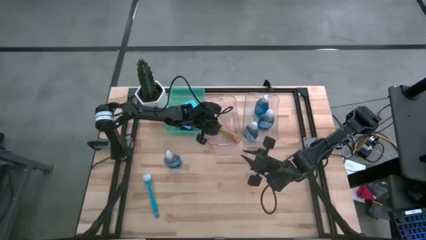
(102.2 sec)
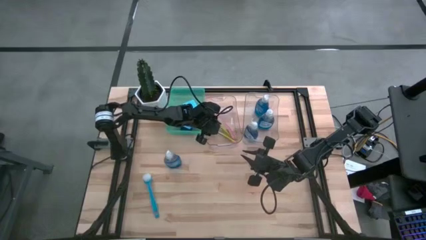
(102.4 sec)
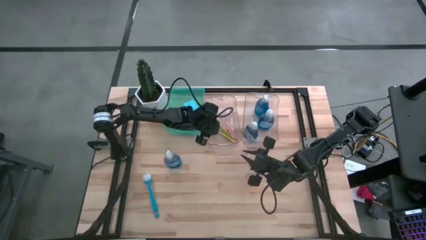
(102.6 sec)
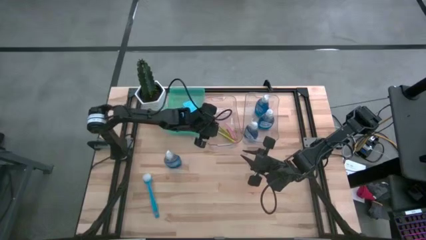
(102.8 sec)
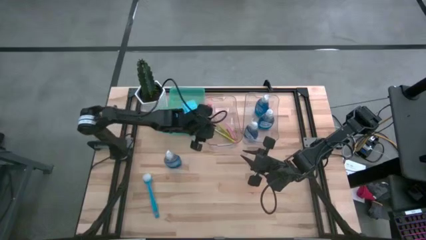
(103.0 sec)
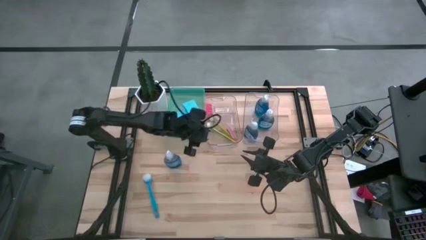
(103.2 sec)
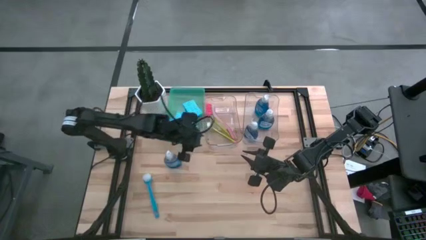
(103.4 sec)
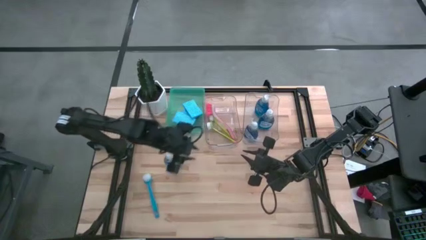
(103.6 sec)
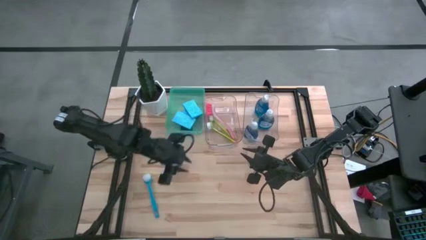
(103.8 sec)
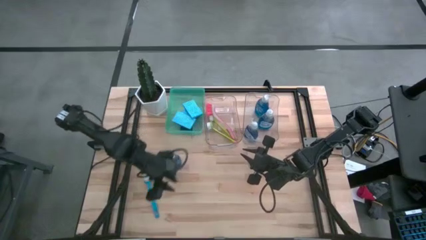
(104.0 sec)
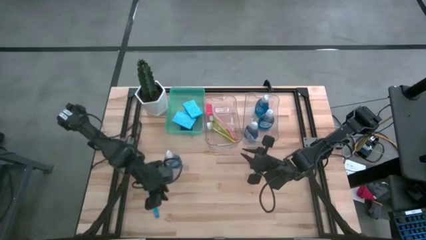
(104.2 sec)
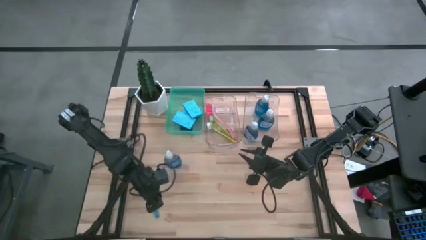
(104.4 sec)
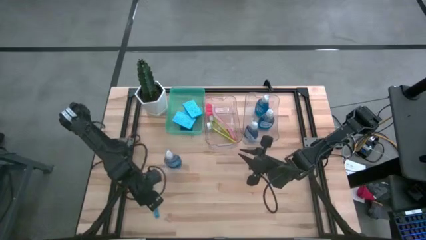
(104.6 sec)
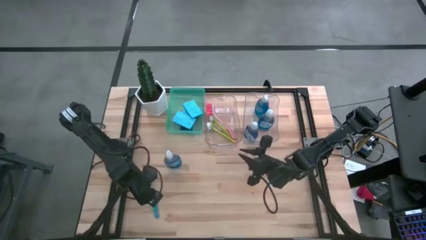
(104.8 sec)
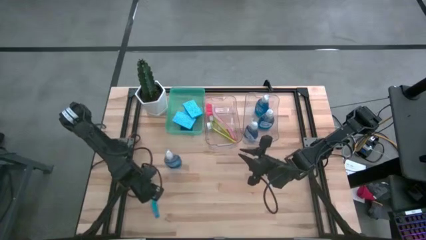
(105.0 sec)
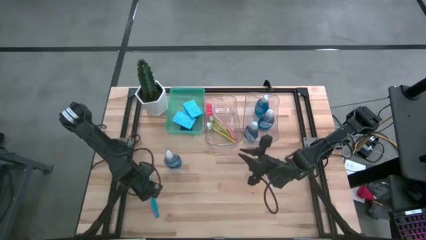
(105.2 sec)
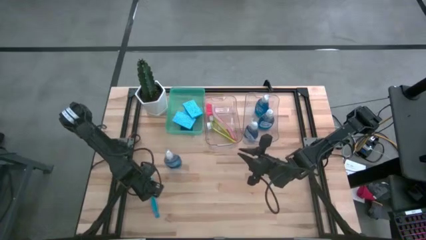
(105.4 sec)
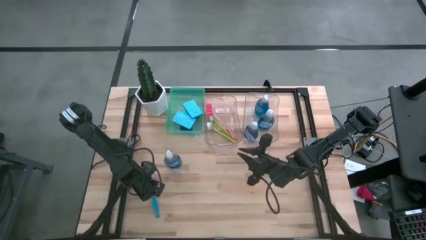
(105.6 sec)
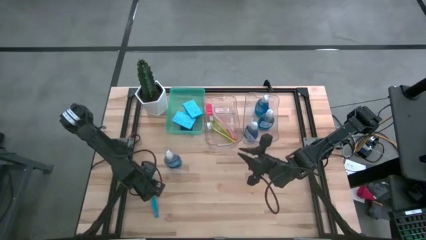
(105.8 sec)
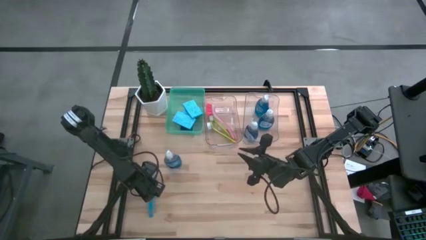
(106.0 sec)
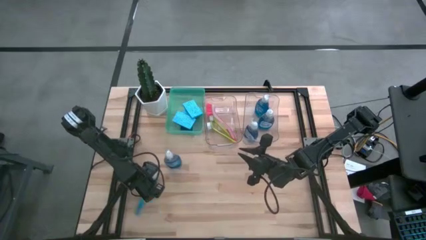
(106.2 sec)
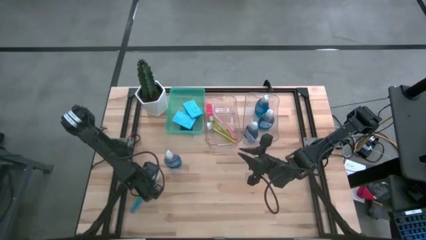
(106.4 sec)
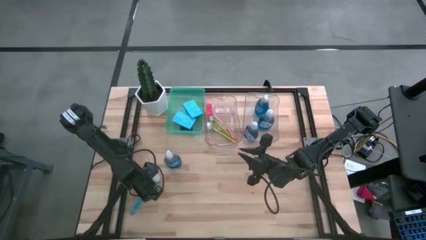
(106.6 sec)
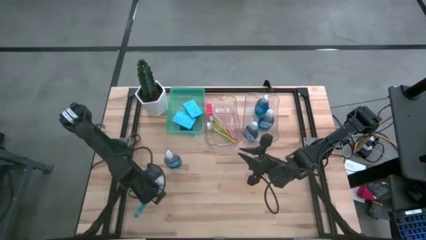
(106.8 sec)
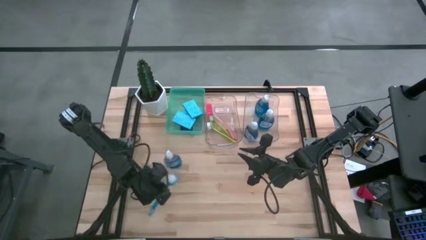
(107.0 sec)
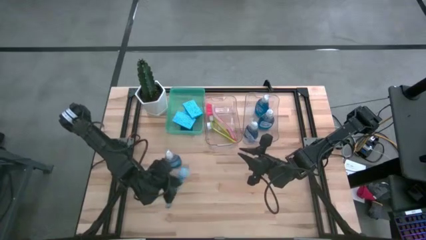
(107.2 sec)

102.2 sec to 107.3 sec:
Task: Pick & Place Kitchen Sink Supplies
Put the blue dish brush into the left transparent bin

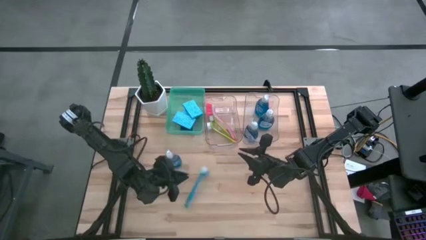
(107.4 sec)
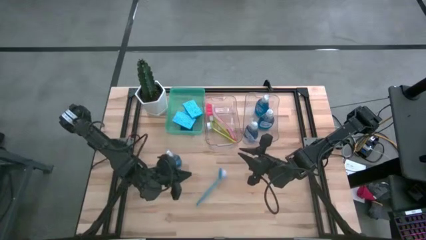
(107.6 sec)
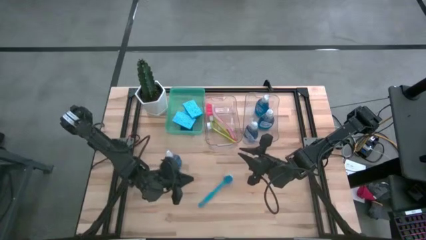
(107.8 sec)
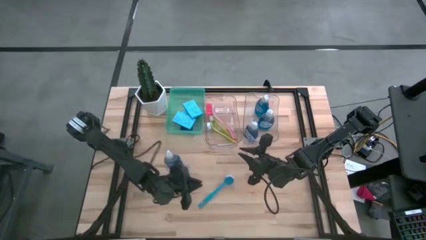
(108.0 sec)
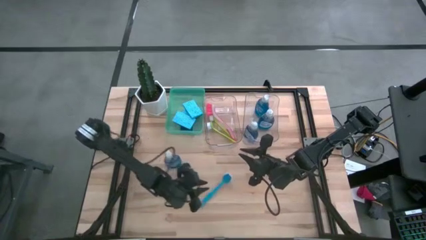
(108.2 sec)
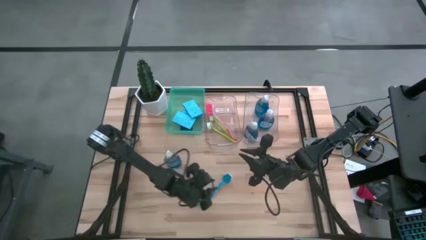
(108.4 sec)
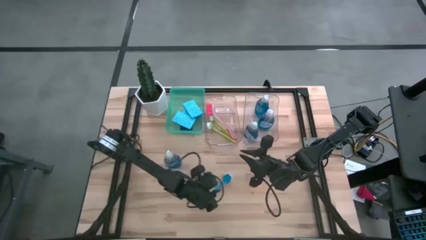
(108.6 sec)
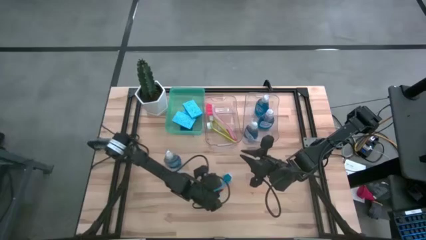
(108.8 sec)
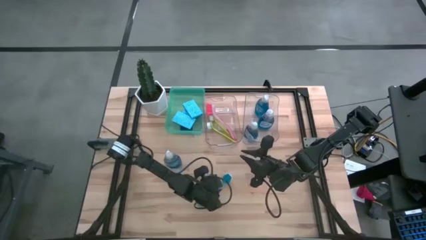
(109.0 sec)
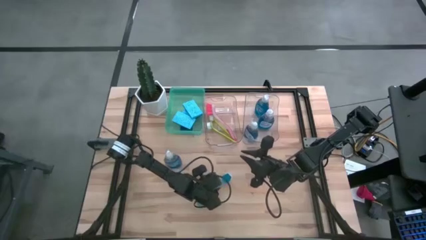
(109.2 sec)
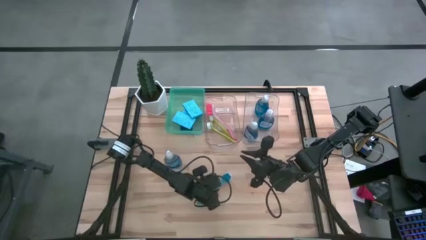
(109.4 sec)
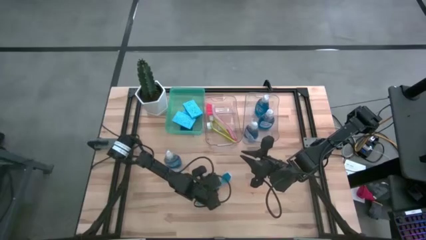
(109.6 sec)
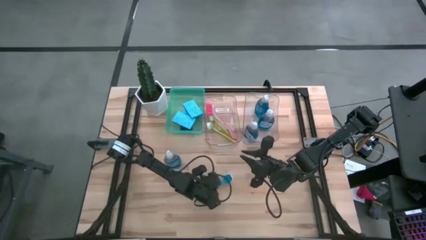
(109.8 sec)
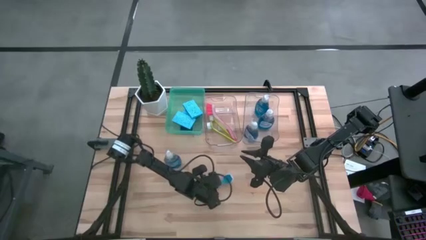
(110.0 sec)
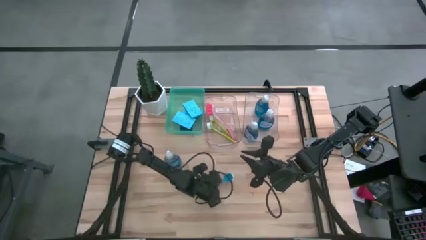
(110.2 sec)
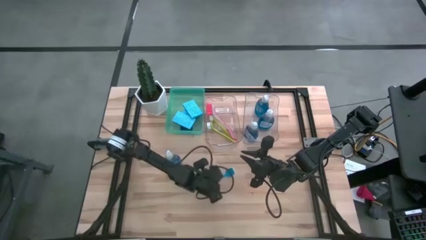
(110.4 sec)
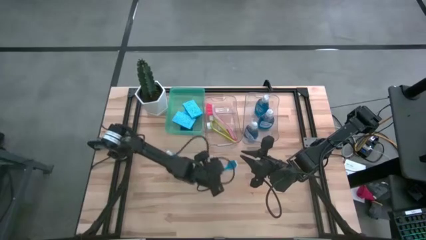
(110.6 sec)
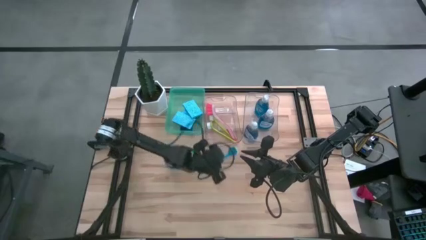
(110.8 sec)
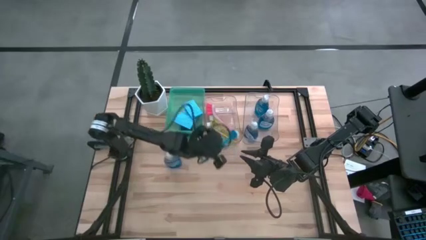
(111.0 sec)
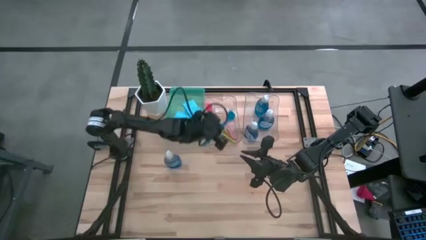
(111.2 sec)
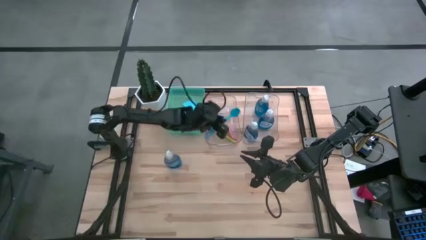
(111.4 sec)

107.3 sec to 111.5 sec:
Put the blue dish brush into the left transparent bin

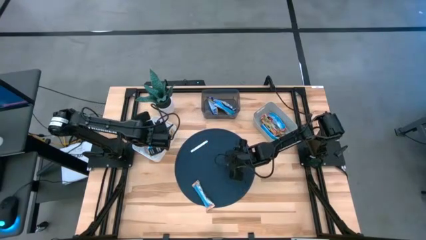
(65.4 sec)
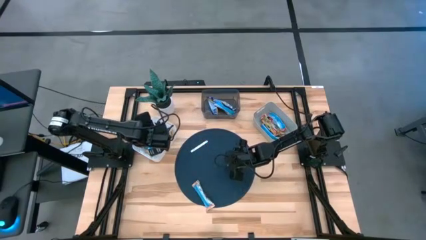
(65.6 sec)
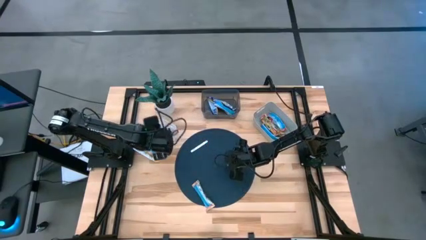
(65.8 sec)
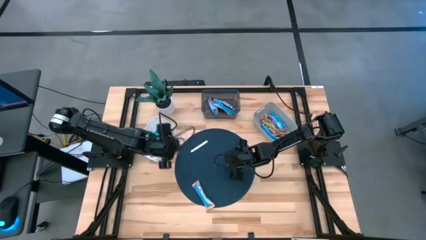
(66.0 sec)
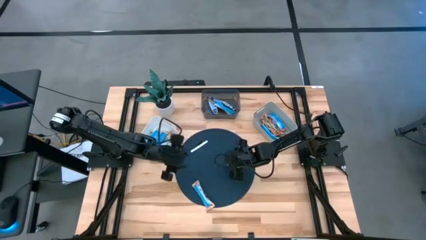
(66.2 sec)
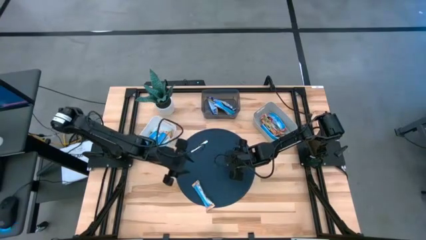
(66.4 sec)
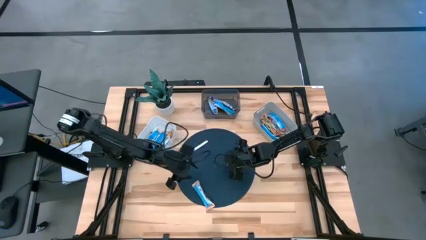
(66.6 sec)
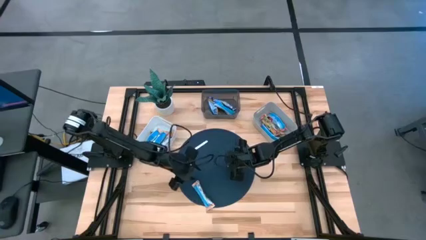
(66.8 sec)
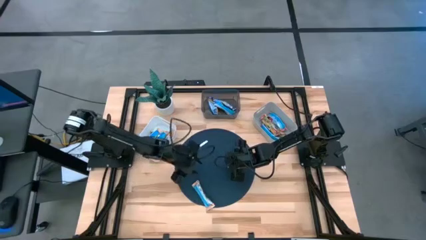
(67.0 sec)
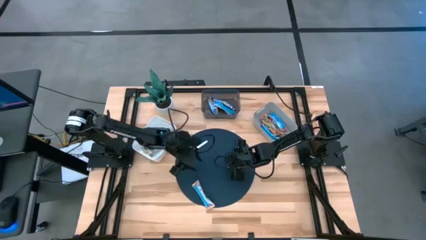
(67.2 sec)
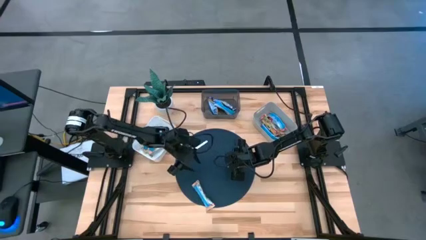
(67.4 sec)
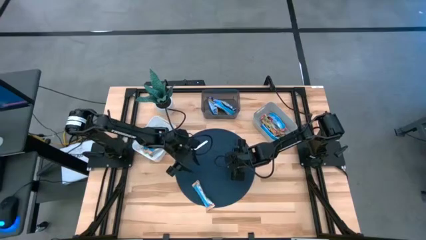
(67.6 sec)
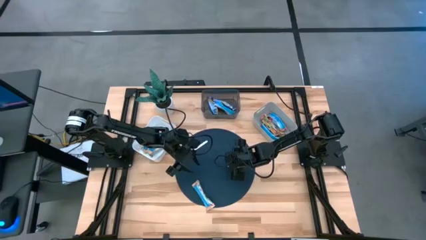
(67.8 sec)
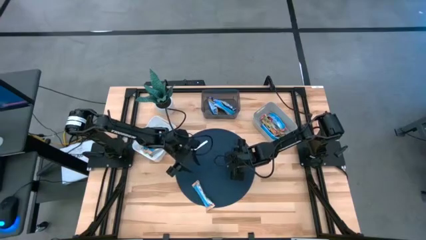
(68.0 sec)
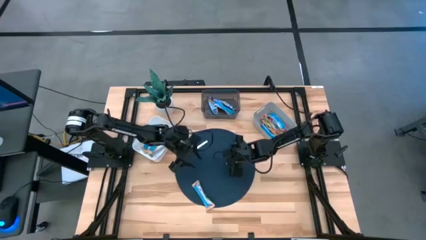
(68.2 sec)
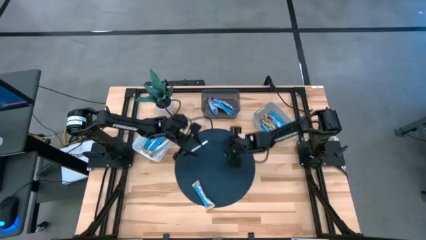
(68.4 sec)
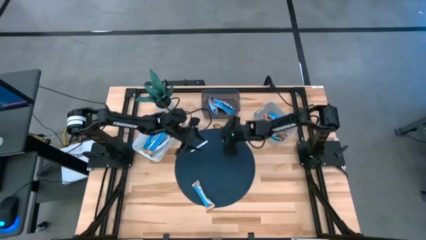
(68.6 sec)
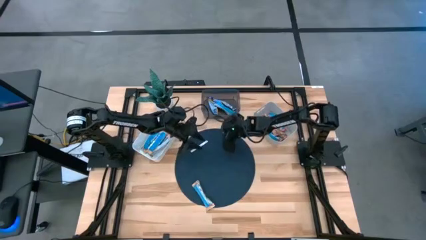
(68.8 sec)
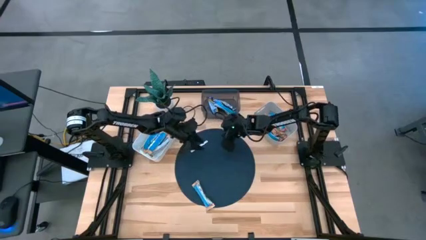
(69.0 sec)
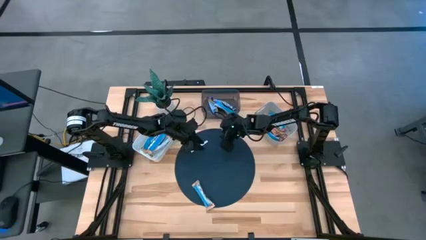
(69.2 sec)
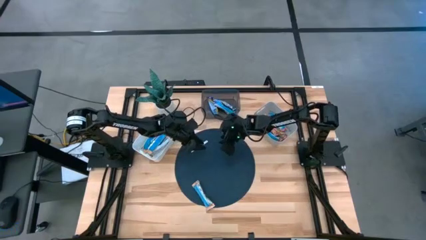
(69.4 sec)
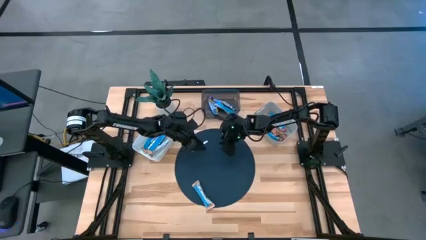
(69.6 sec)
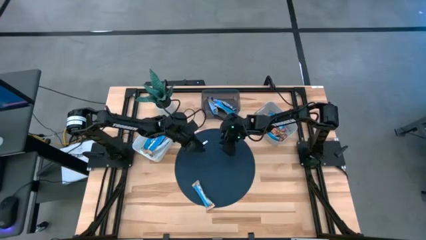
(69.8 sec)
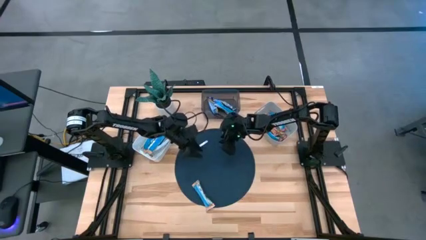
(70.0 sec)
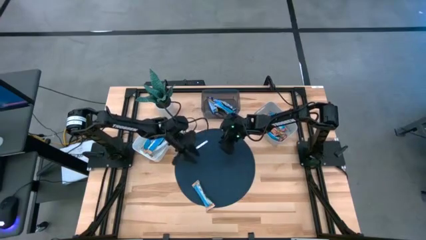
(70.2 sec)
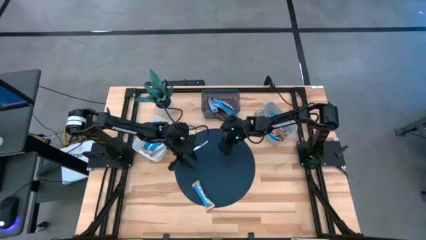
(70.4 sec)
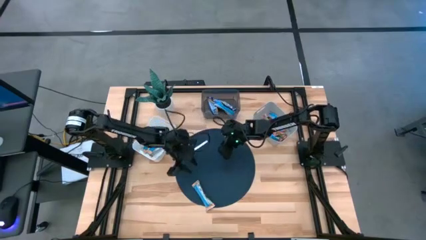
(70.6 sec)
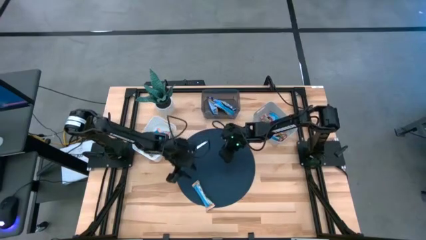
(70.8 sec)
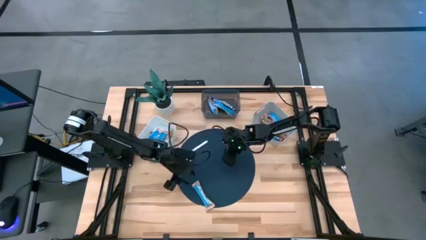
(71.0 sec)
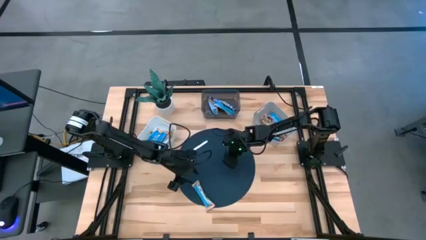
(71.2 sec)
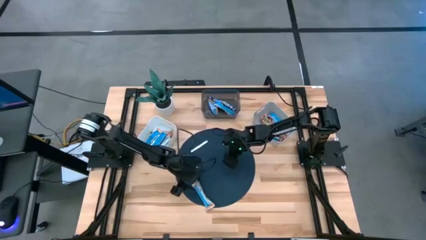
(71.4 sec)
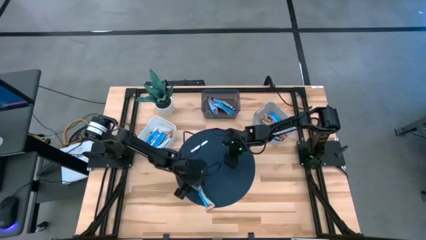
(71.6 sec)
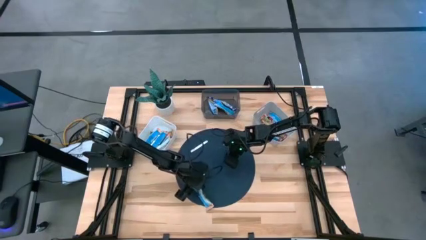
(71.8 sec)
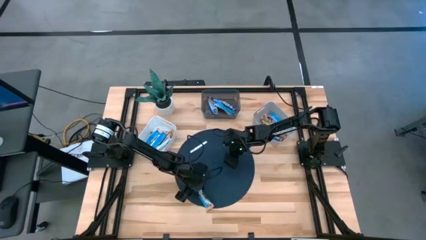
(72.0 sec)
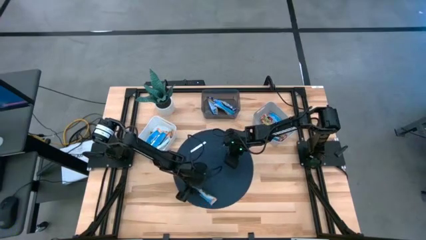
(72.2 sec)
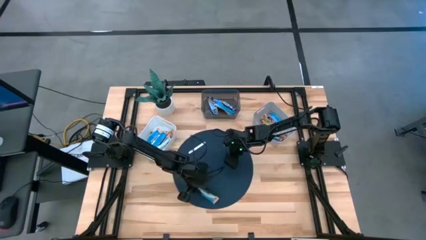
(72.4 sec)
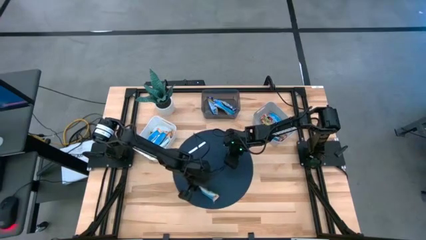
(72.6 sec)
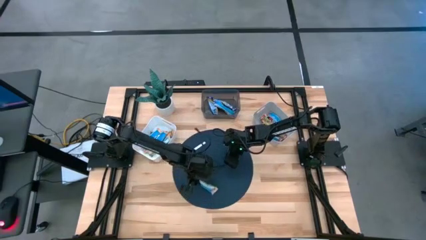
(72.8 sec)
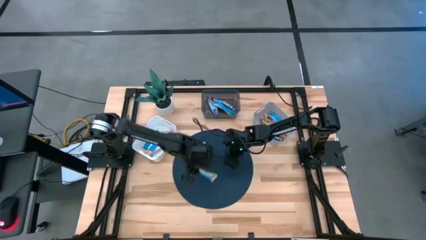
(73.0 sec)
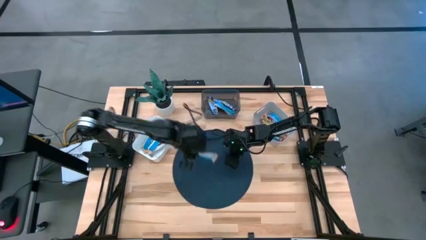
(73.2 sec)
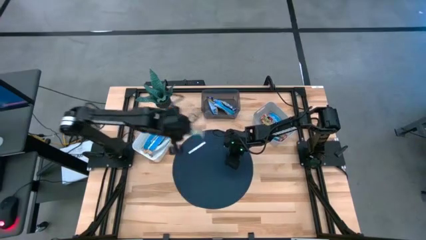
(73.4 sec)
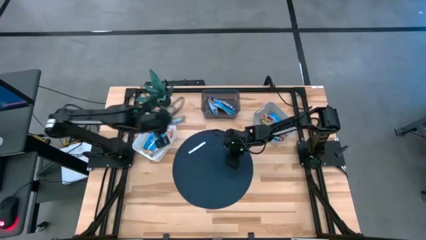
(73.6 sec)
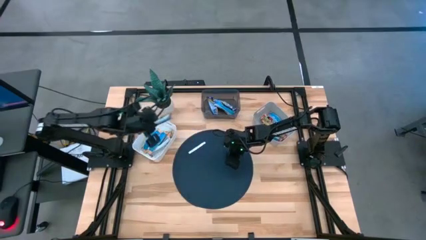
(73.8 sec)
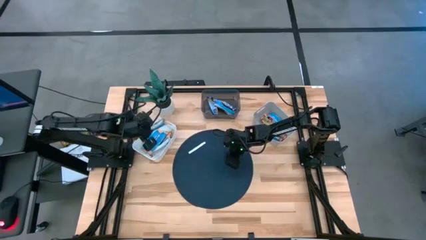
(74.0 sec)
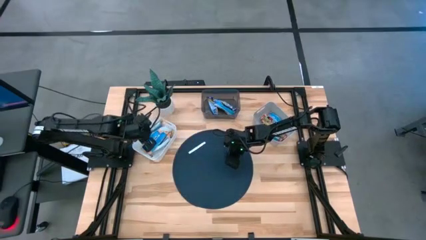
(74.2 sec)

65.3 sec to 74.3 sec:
Task: Pick and place Granola Bars by type
Put the yellow granola bar into the white bin
